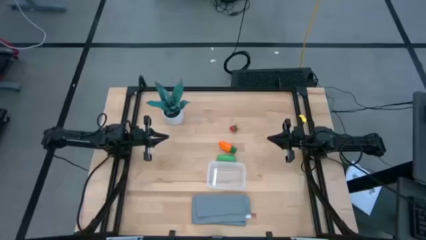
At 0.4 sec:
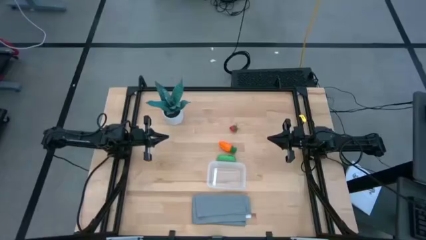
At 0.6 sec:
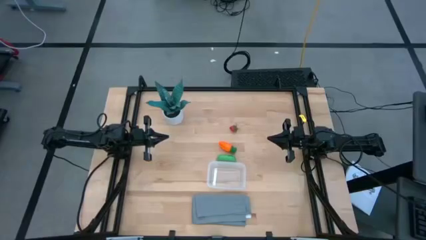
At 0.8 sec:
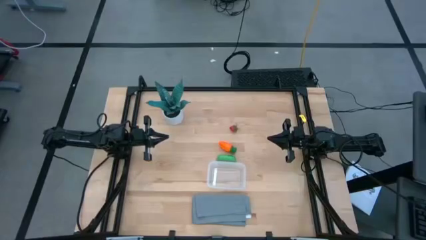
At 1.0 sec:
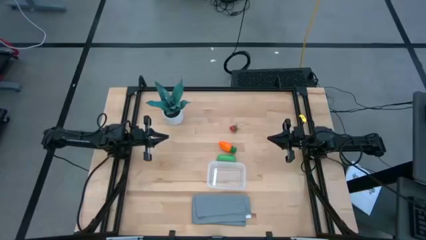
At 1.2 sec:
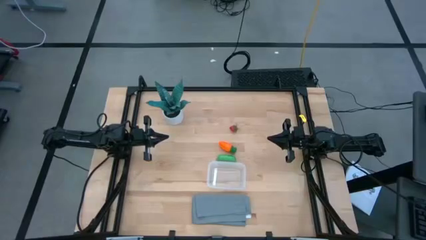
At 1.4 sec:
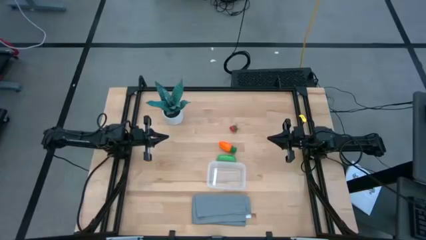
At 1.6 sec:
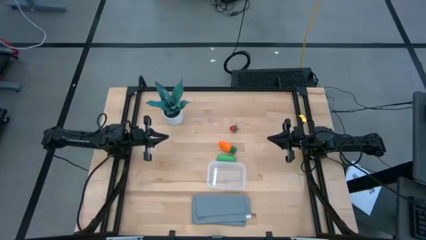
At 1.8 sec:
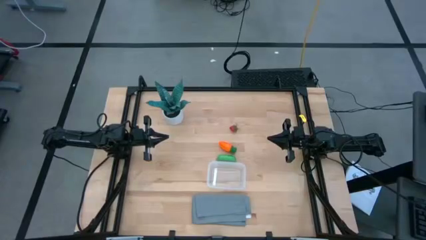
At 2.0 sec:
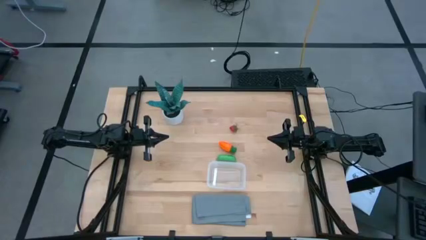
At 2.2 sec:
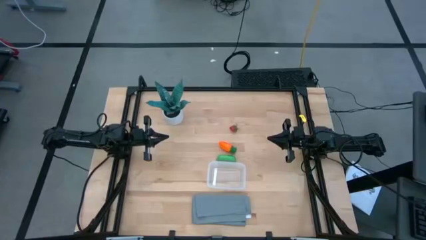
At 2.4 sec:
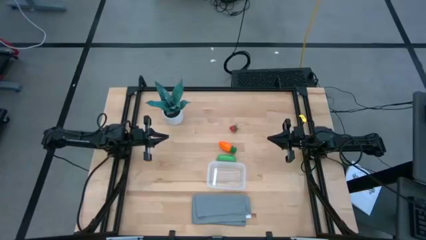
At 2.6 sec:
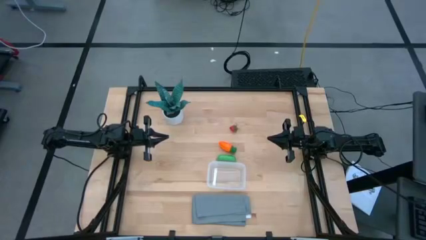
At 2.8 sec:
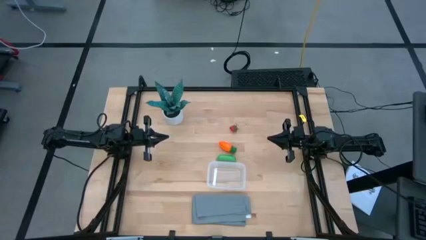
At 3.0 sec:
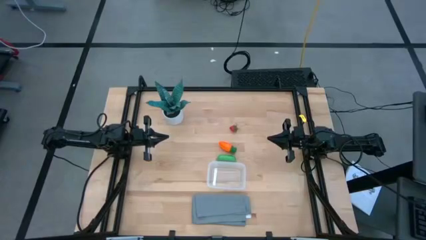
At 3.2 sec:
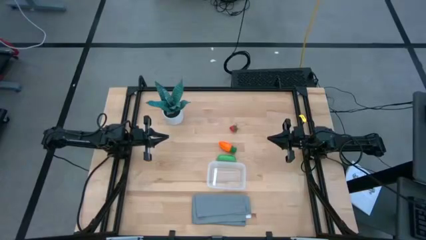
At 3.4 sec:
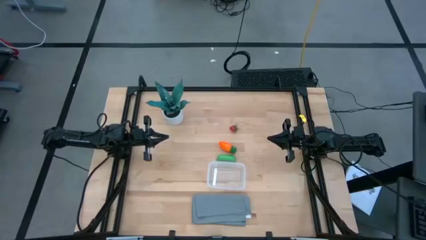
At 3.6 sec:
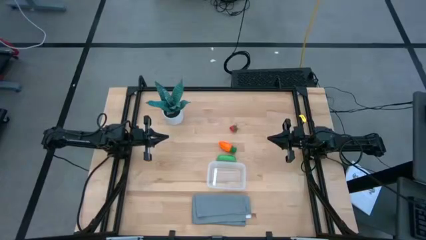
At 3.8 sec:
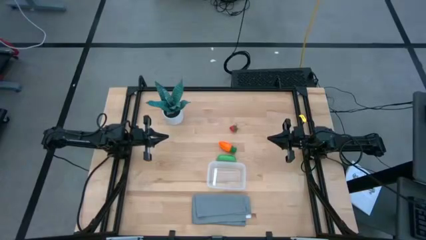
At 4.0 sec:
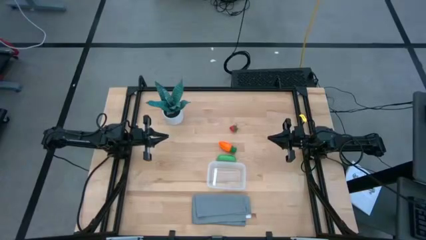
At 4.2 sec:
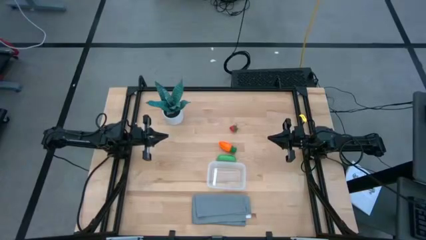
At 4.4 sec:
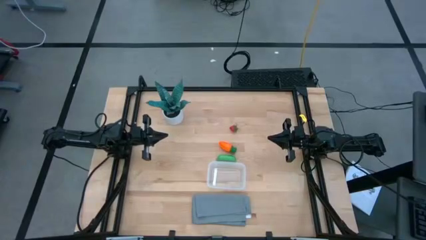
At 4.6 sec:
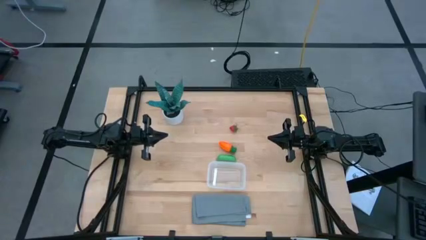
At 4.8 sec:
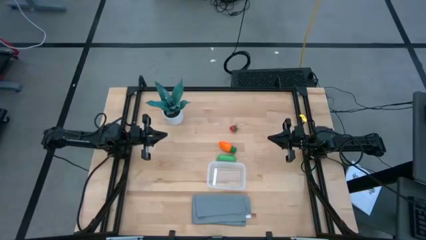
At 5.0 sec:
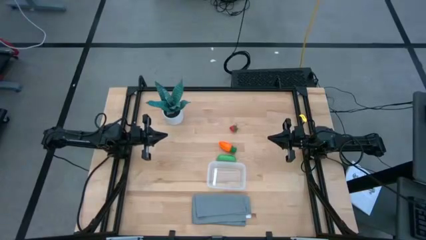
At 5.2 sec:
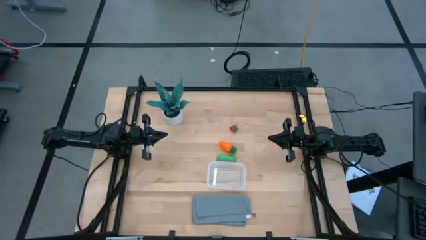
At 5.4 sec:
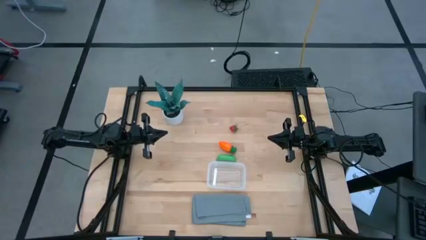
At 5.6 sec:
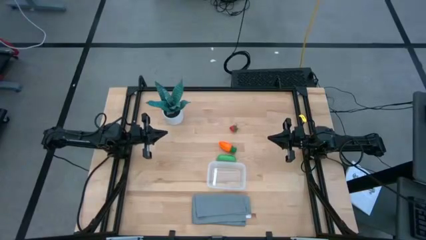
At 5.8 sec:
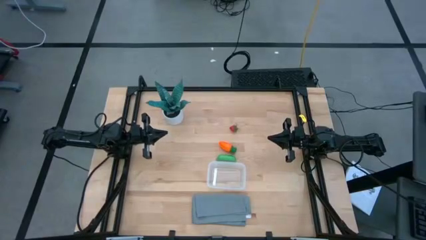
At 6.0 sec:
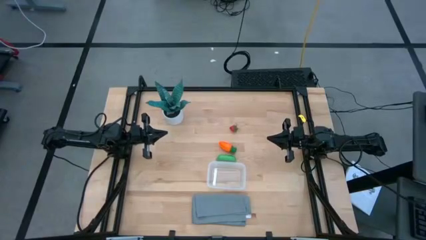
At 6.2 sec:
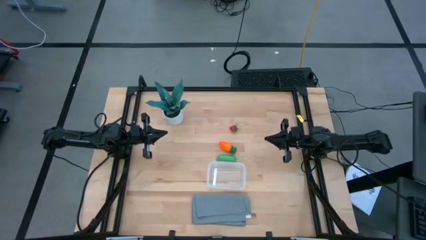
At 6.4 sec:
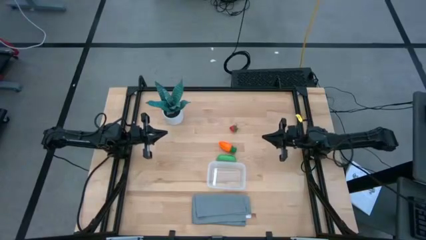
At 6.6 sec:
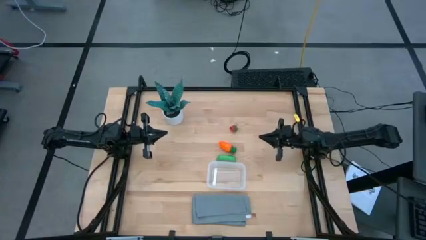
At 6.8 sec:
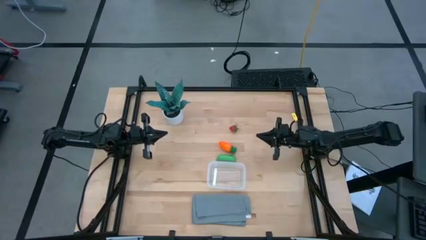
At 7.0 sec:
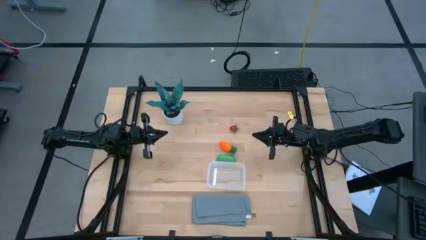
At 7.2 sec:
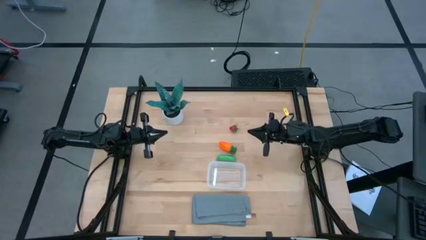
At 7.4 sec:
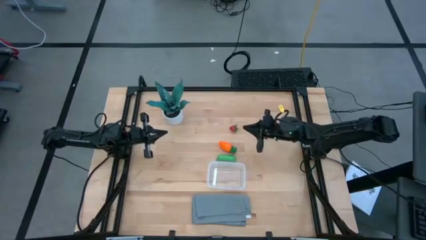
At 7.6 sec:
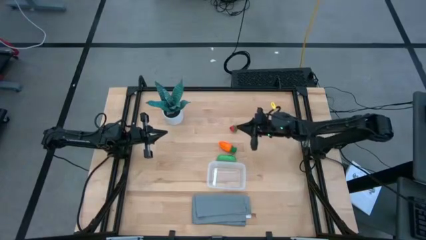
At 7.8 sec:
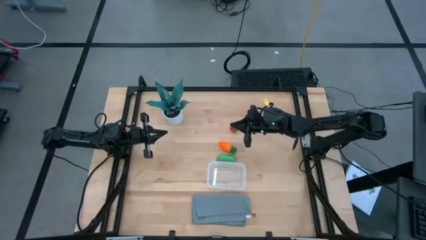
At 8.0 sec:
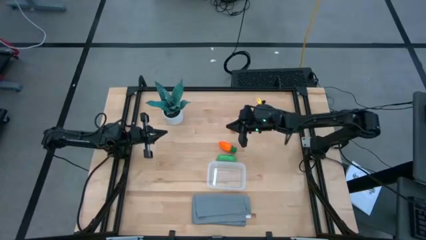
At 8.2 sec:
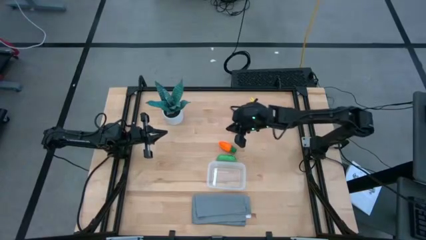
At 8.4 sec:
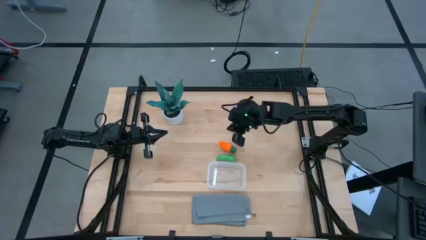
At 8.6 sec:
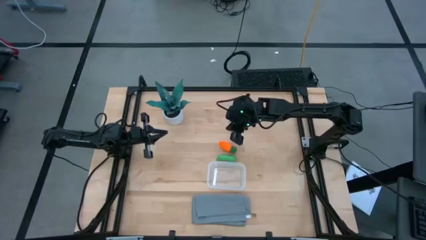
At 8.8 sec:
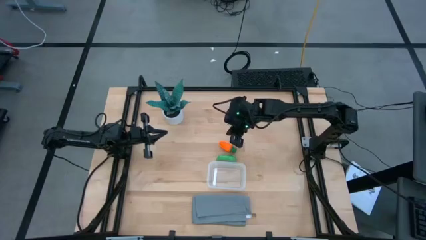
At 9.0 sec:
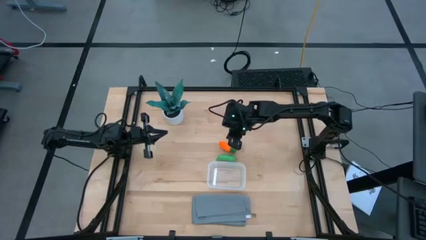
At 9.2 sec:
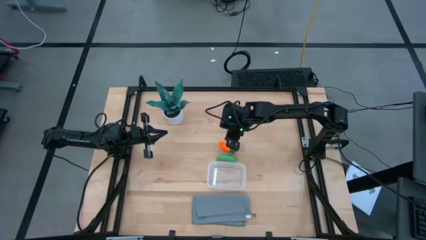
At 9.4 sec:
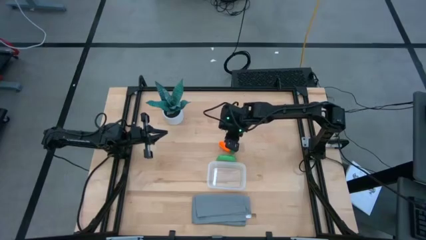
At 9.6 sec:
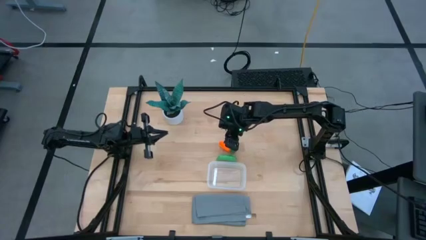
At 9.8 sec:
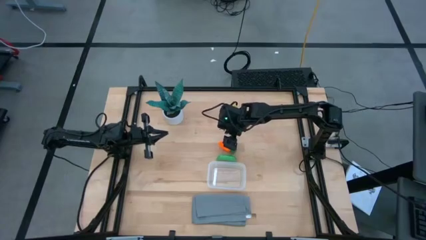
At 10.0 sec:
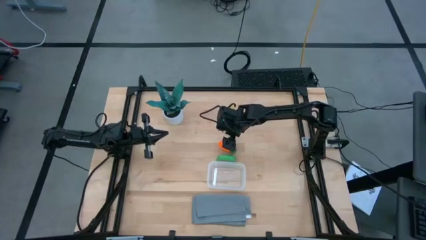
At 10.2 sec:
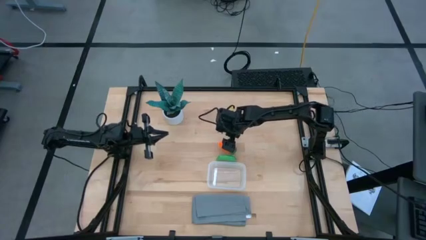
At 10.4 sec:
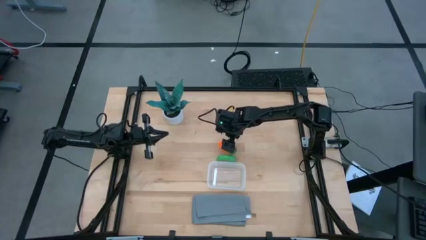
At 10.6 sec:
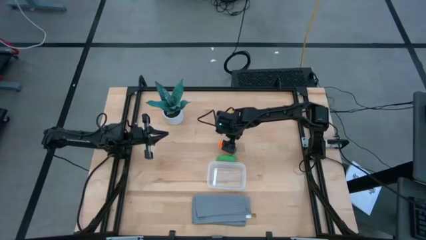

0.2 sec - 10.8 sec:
Task: Pick and placing Produce into tupperware
Put the carrot into the transparent bin
